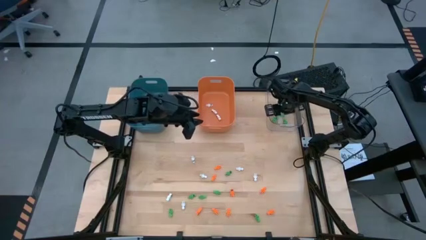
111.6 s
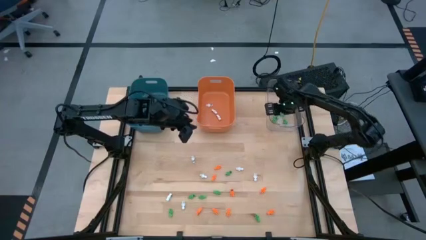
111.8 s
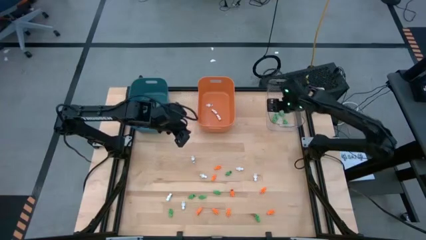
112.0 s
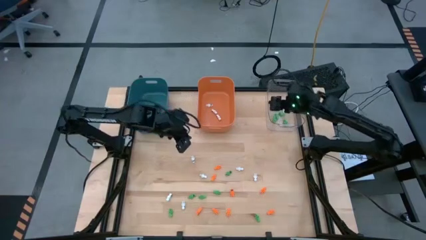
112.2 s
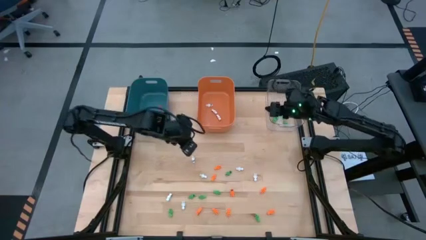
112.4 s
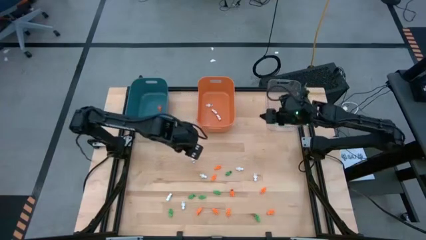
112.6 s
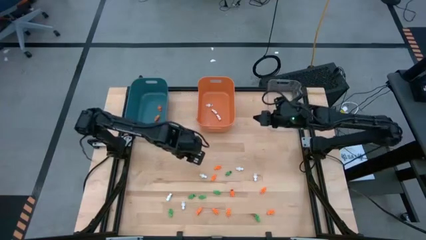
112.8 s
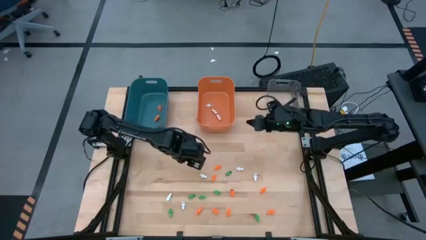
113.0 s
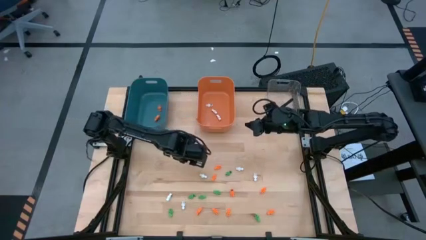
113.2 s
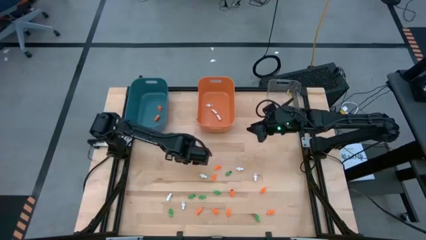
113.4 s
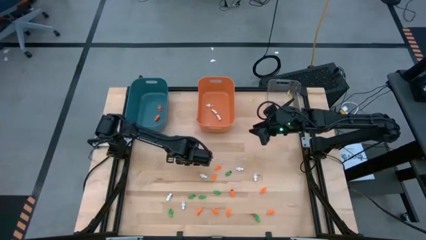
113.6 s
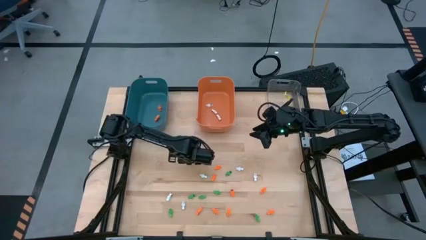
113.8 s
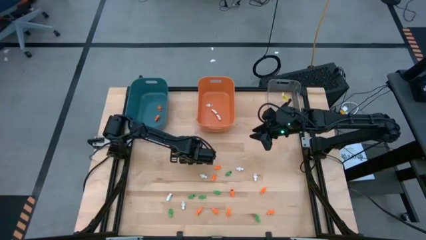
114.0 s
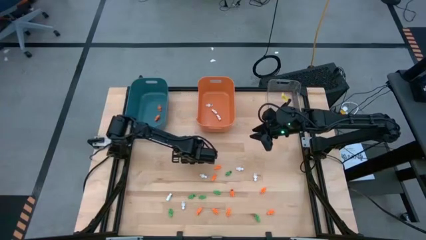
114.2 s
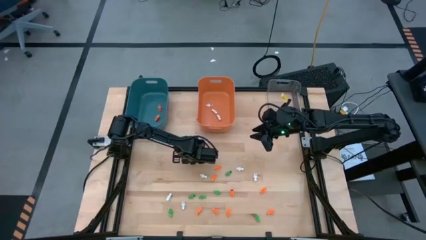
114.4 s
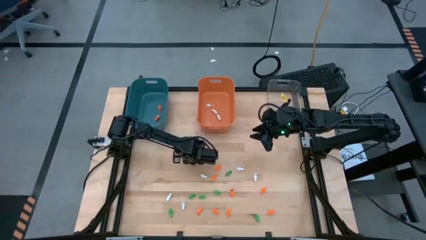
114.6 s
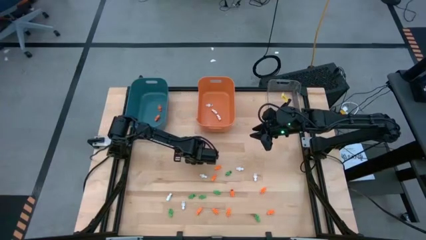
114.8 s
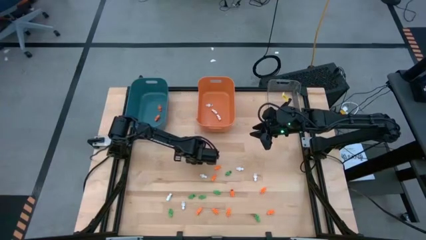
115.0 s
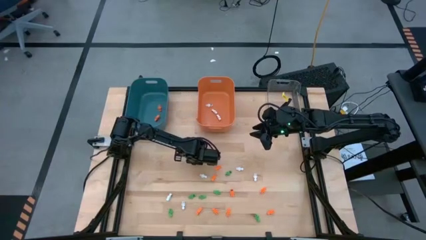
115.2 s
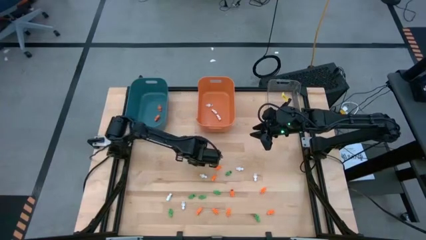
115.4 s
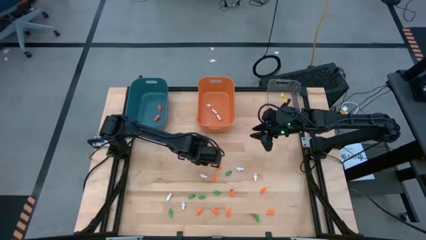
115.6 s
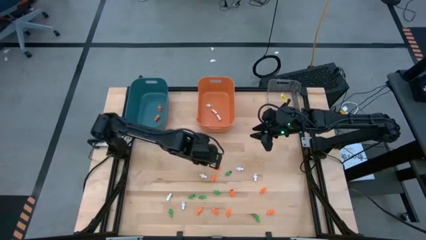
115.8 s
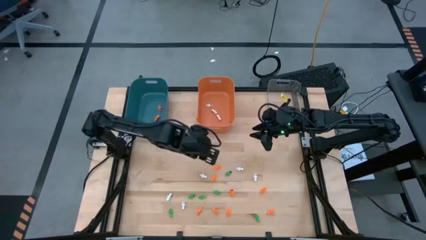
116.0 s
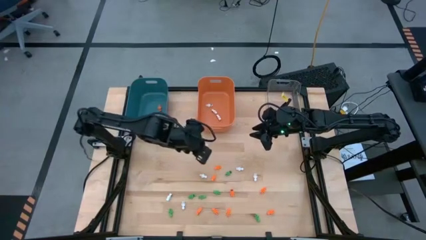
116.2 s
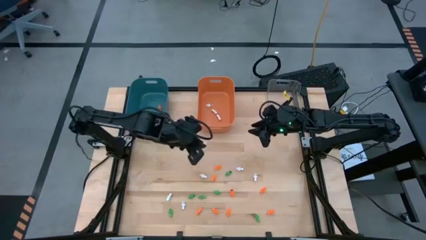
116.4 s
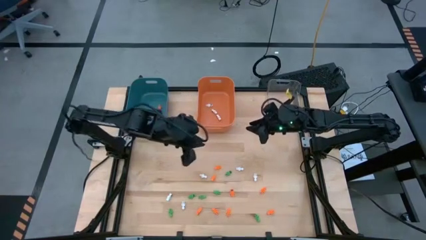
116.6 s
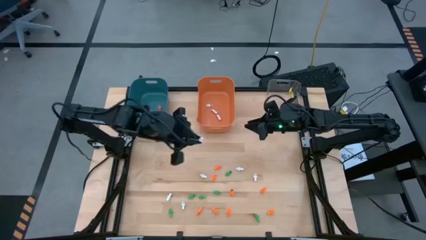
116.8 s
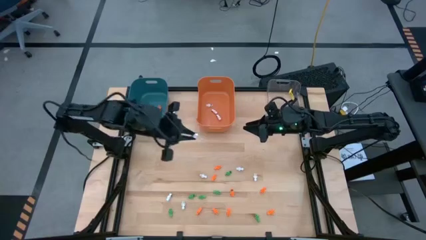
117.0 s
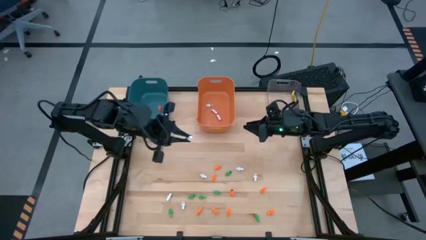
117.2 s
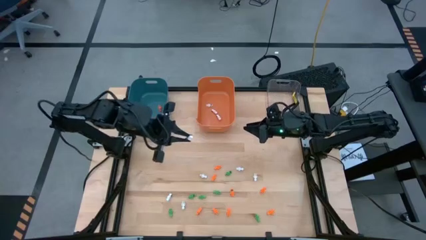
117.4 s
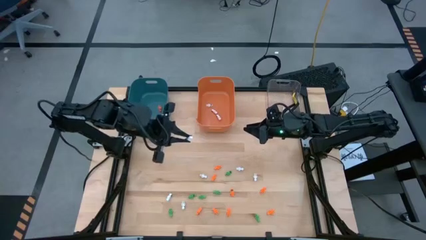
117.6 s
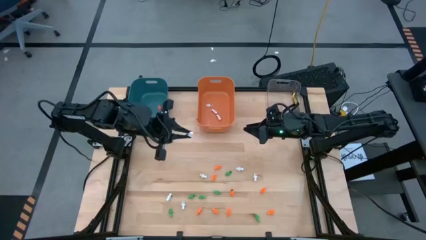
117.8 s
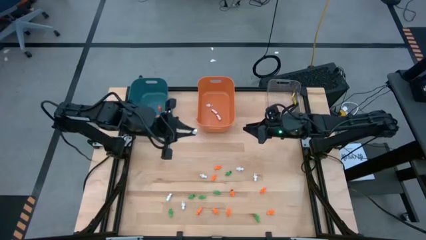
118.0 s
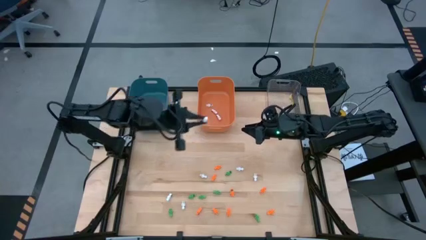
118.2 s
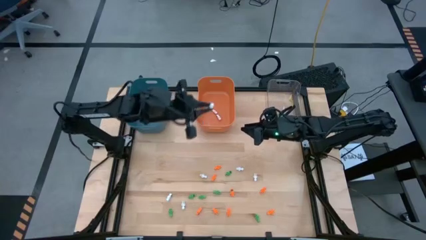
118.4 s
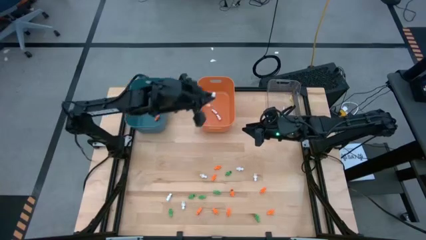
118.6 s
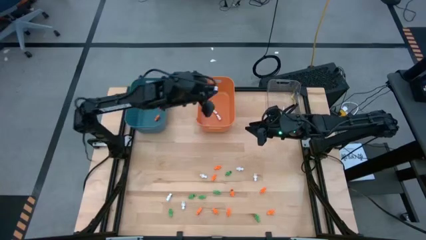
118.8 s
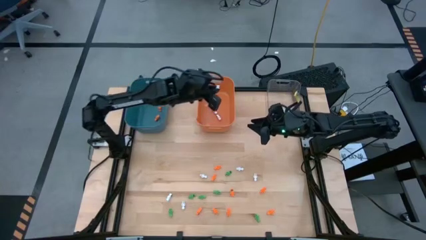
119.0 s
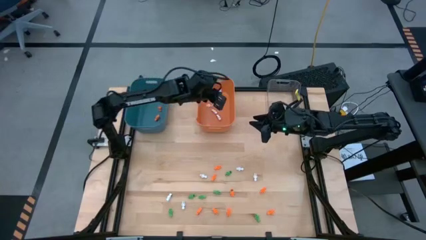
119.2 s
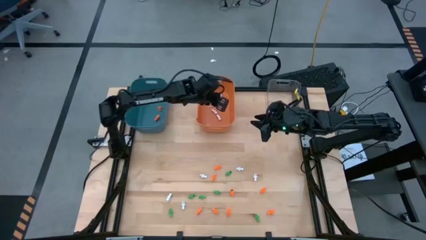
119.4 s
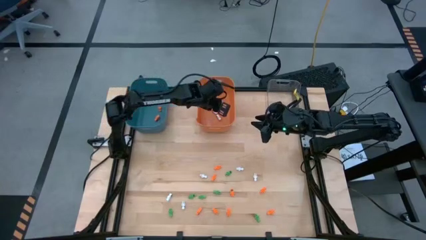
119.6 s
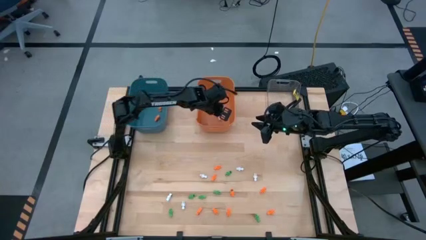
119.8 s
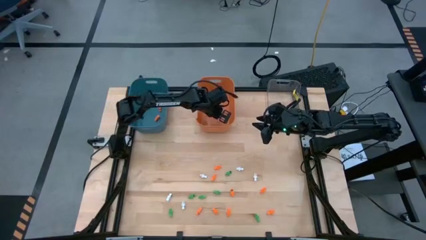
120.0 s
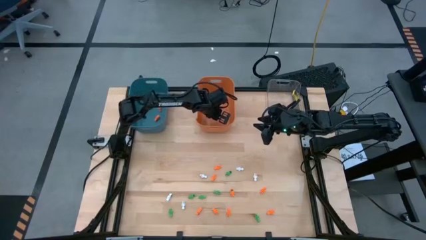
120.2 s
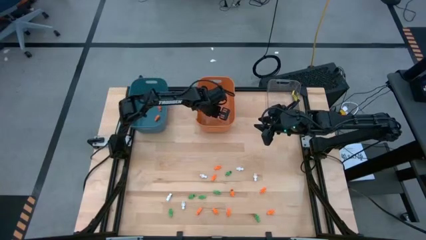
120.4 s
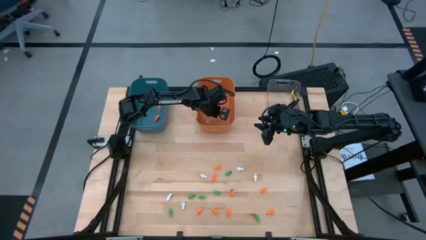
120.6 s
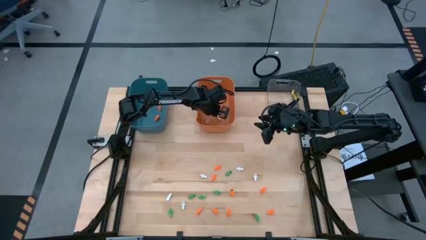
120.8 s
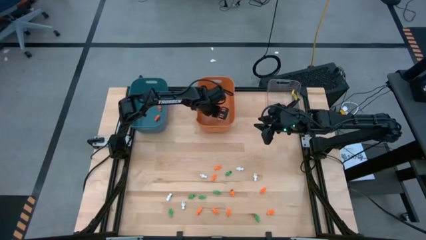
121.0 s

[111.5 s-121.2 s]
Task: Sort Halloween decoration
Put the white skeleton toy into the orange bin
